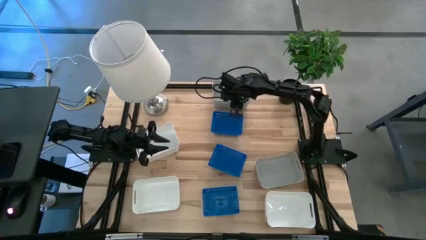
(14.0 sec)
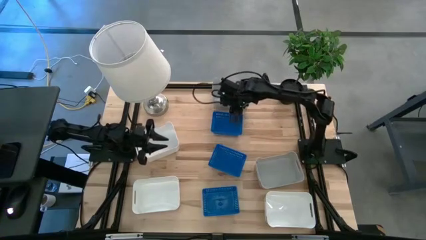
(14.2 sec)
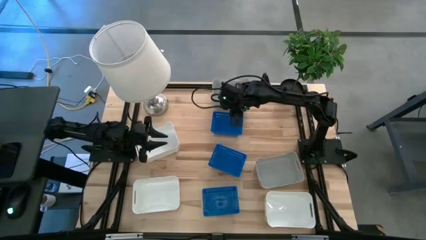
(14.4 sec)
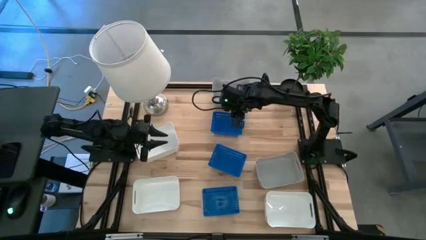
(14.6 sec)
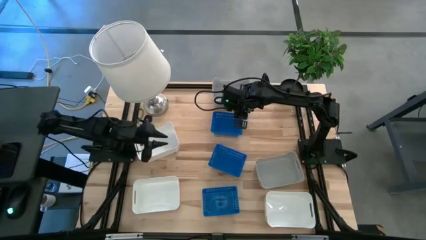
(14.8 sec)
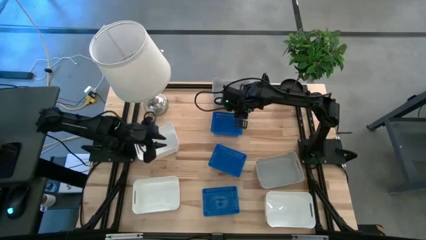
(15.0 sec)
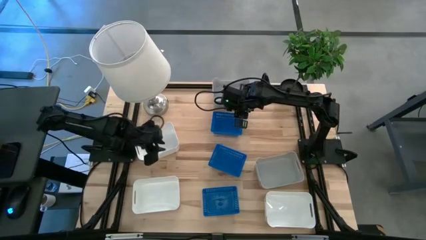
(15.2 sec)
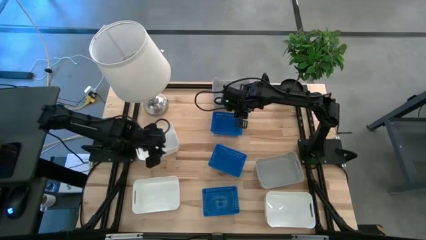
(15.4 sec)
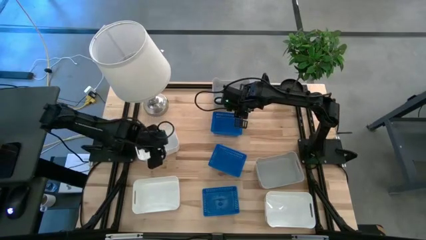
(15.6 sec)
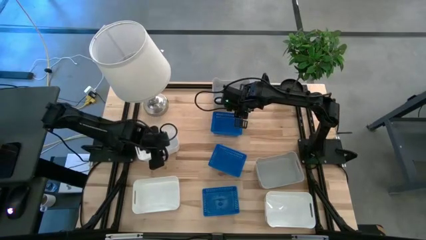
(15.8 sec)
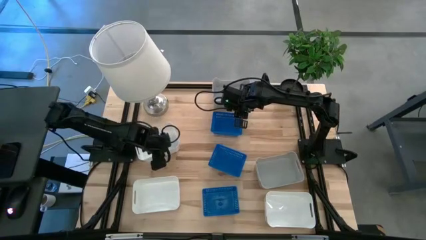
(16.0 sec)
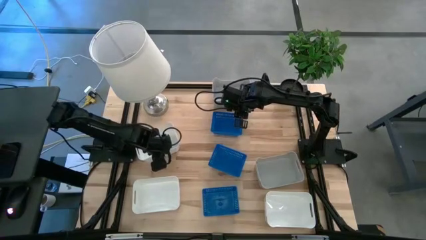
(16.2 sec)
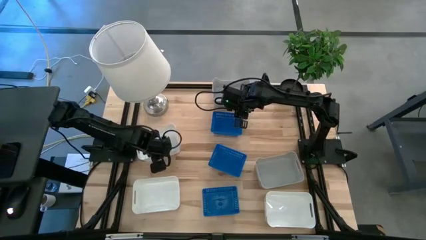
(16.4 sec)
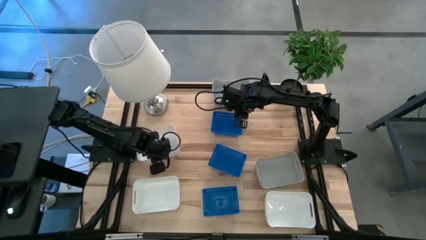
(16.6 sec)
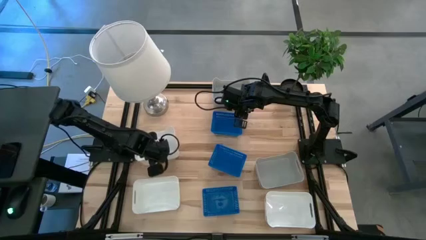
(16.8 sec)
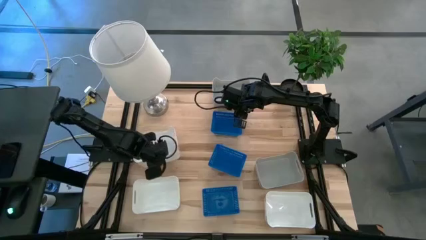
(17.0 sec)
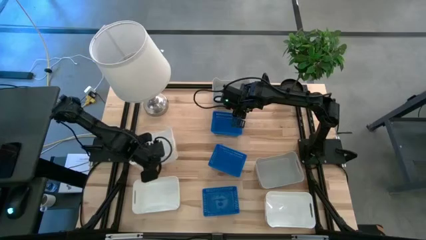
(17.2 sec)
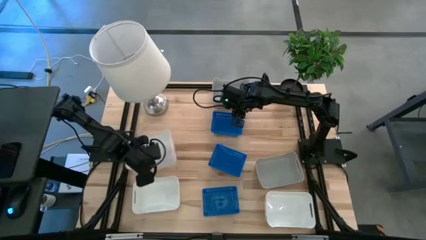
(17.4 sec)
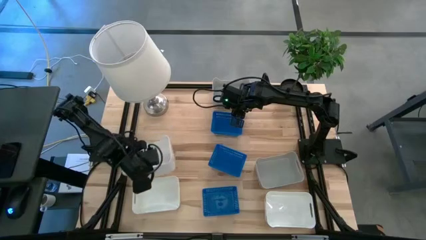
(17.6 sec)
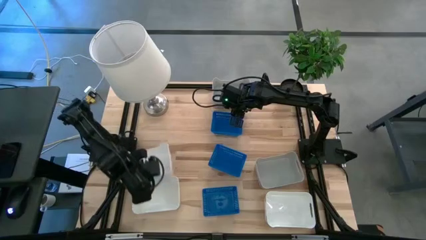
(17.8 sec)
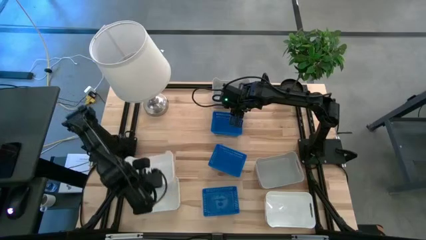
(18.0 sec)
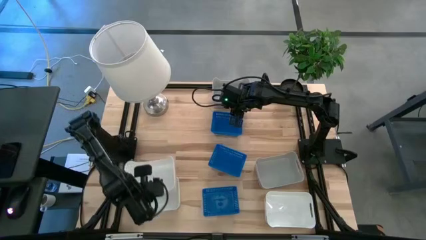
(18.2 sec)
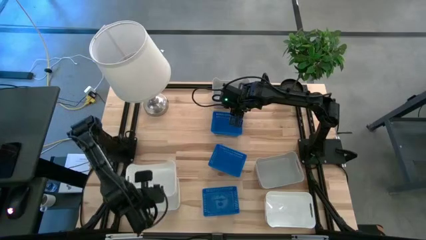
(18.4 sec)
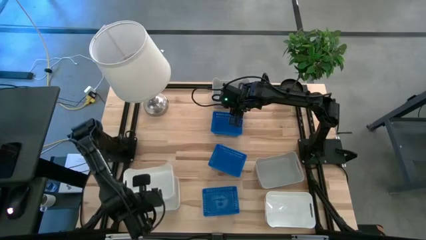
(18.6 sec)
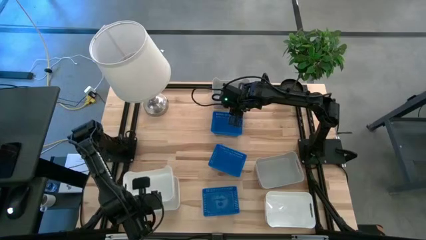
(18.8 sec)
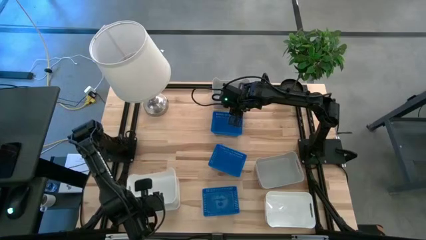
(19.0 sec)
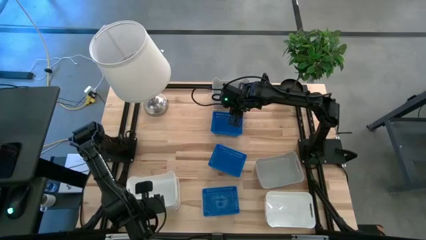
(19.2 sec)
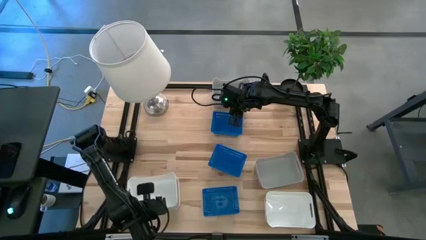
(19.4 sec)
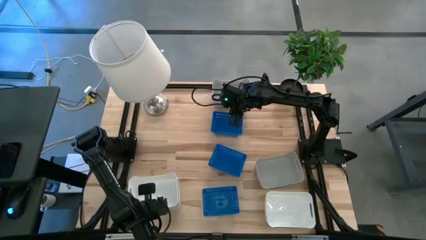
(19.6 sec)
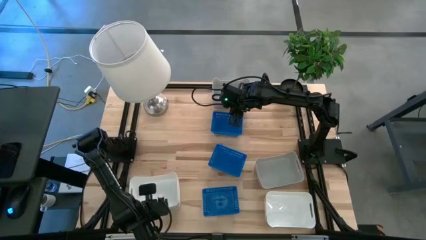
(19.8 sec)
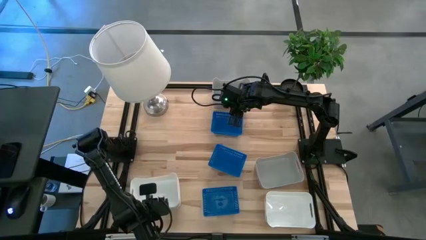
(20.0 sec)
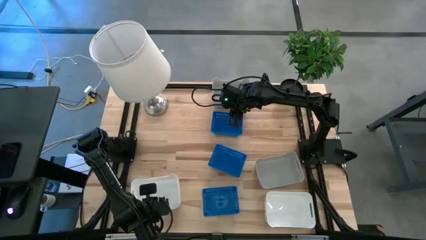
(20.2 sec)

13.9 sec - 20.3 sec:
Stack the top white bin on the bottom left white bin

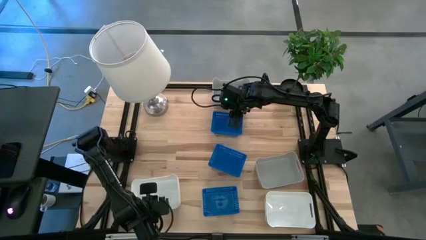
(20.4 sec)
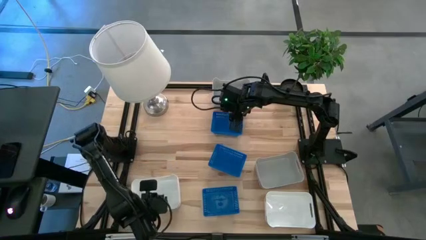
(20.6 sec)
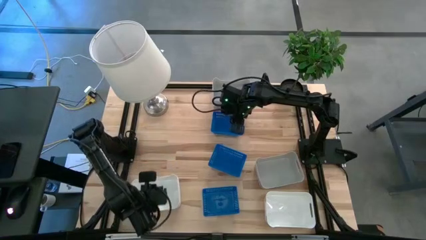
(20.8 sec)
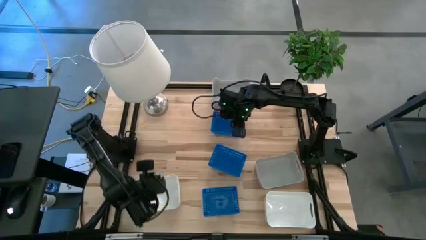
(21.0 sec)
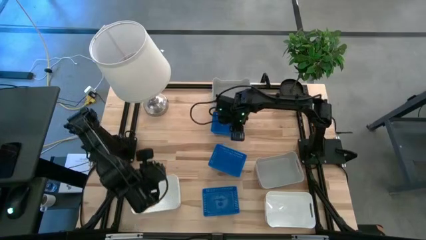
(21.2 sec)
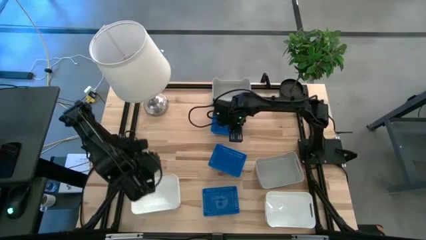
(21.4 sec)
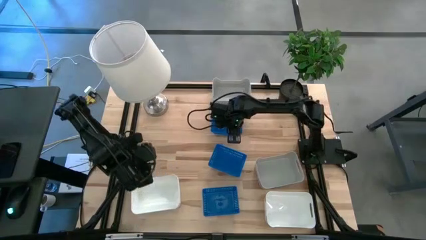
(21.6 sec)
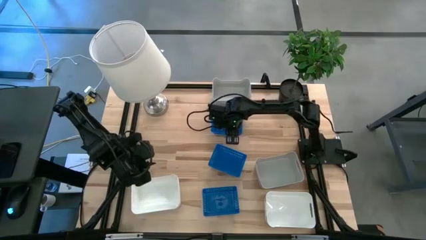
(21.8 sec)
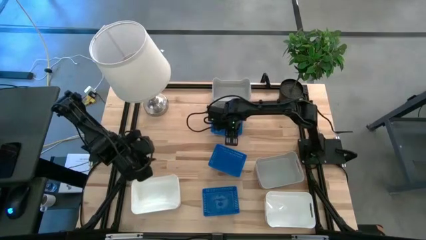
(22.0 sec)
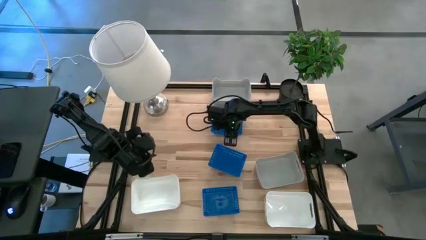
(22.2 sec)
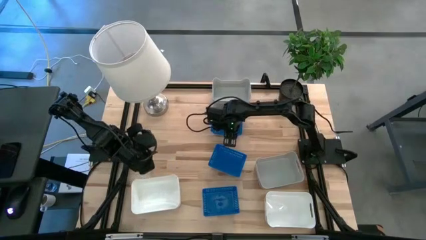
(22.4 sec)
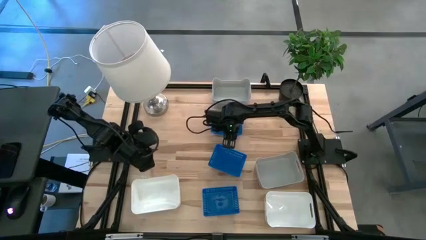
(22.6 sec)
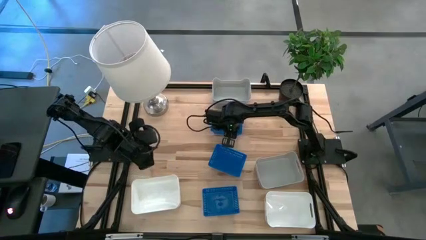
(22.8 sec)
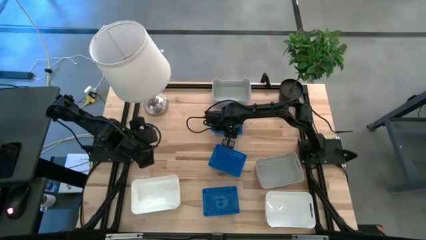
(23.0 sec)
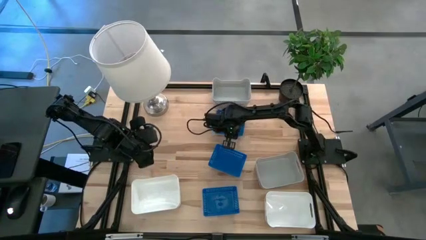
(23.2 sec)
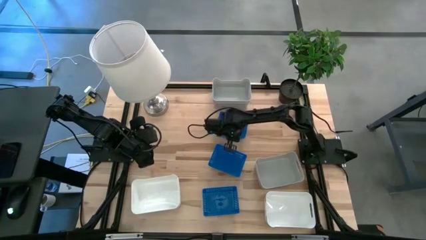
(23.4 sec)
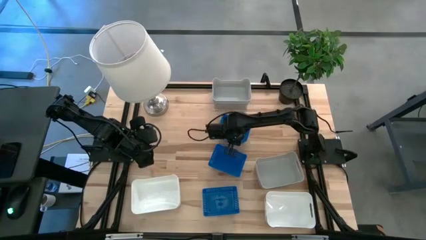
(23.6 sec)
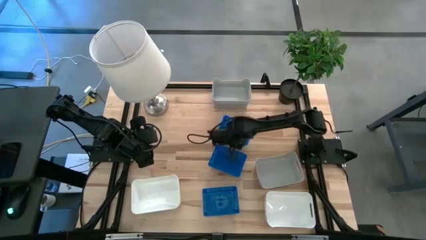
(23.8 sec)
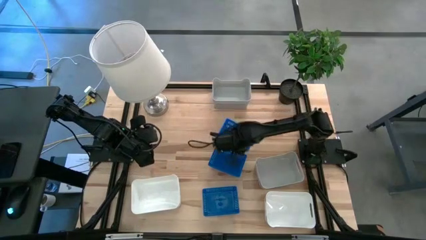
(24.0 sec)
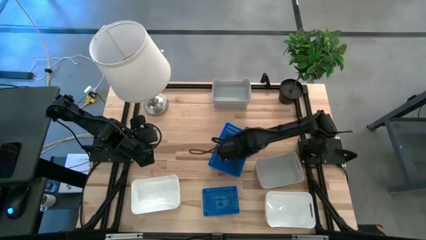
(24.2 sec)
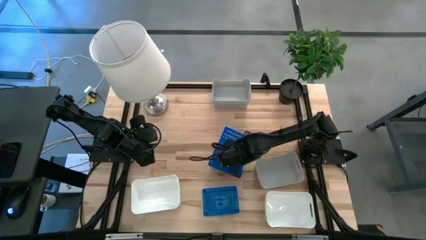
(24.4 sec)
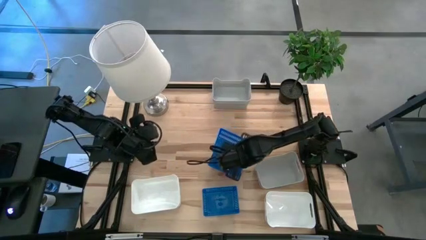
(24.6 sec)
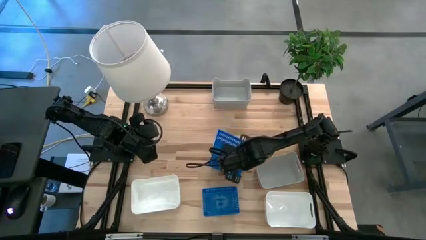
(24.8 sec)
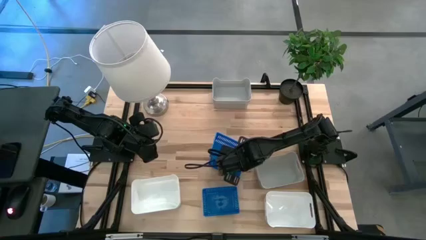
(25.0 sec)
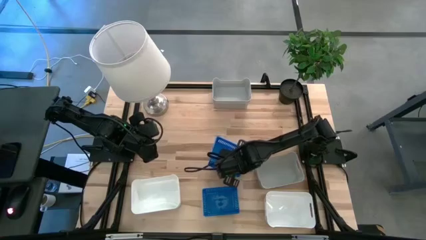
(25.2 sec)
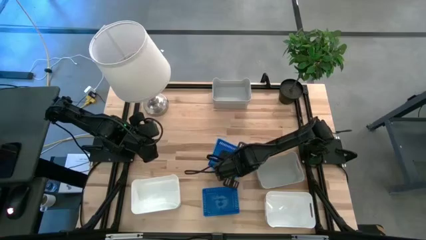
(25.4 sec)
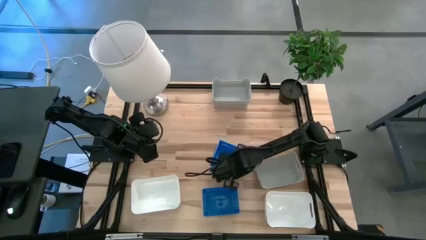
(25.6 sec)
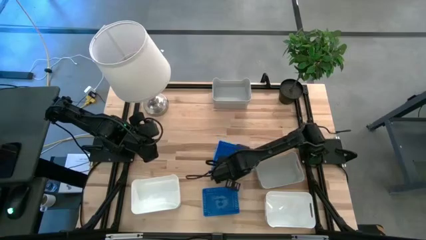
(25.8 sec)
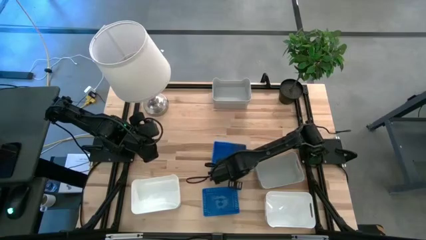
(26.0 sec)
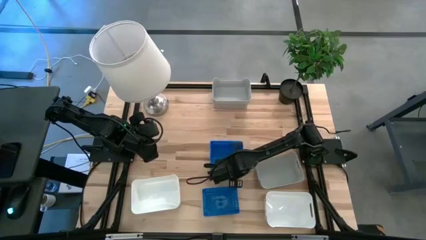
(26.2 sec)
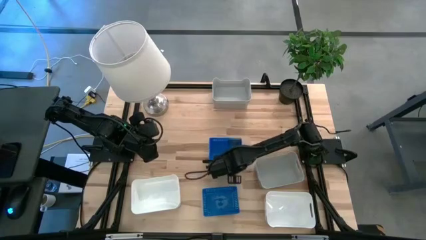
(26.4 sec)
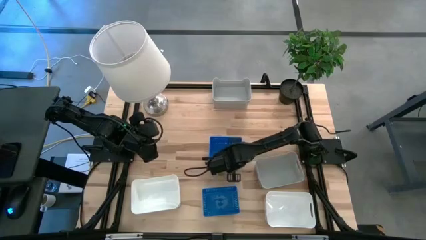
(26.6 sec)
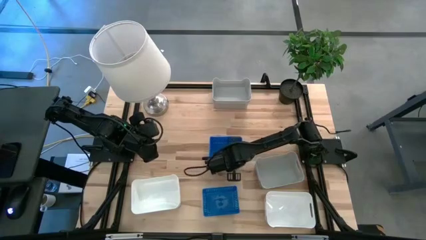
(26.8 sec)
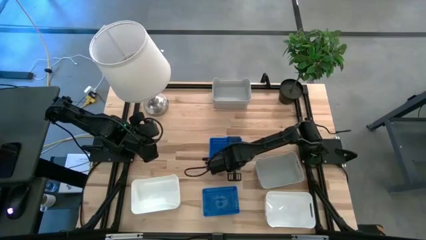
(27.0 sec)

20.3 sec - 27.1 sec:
Stack the top blue bin on the center blue bin
